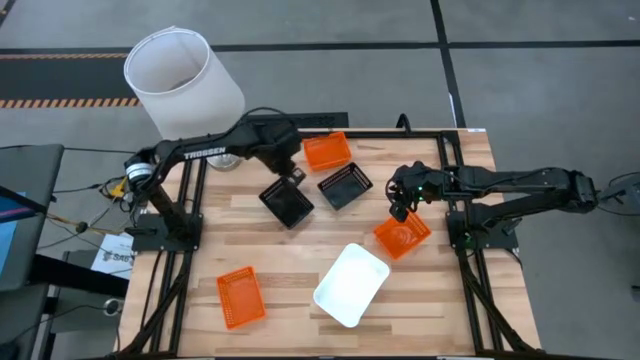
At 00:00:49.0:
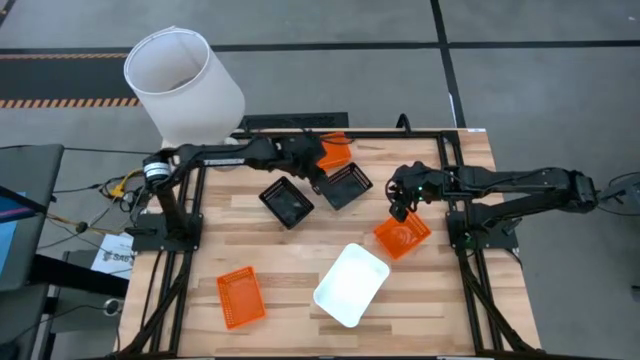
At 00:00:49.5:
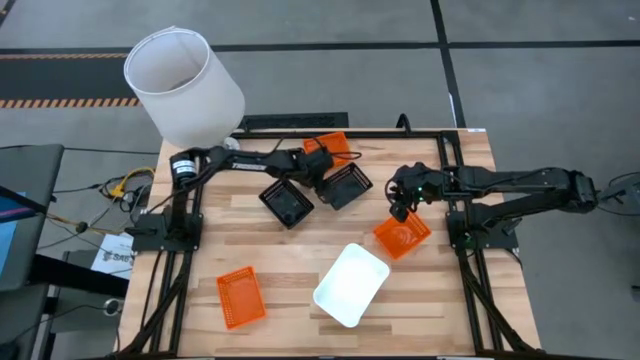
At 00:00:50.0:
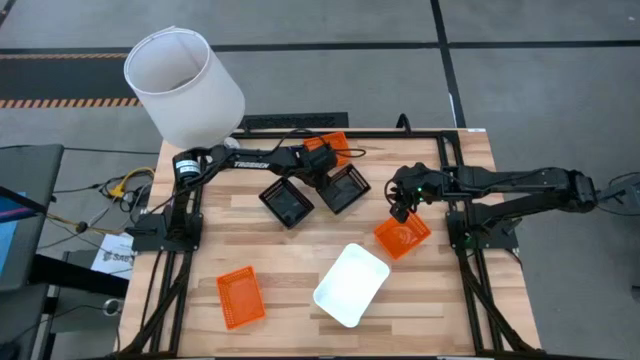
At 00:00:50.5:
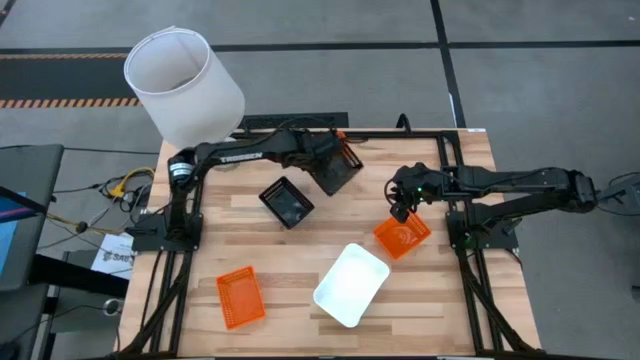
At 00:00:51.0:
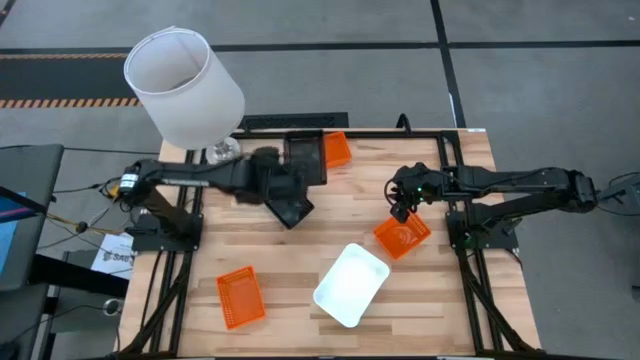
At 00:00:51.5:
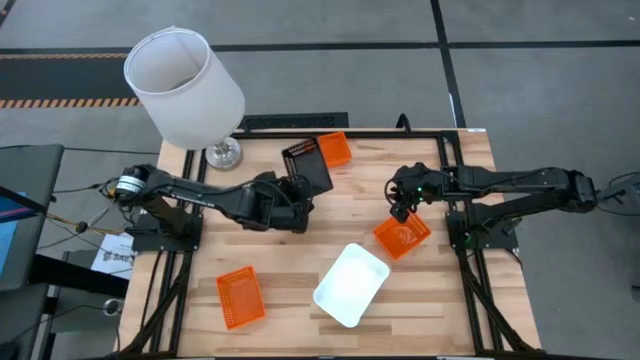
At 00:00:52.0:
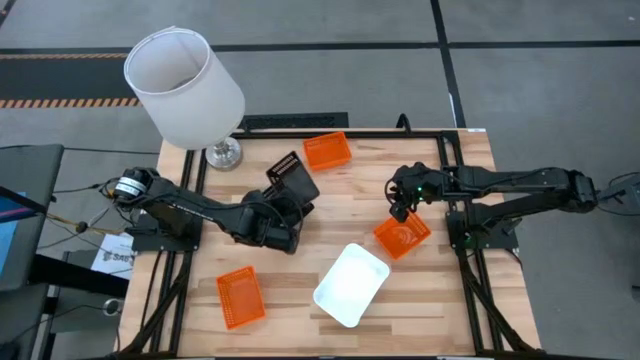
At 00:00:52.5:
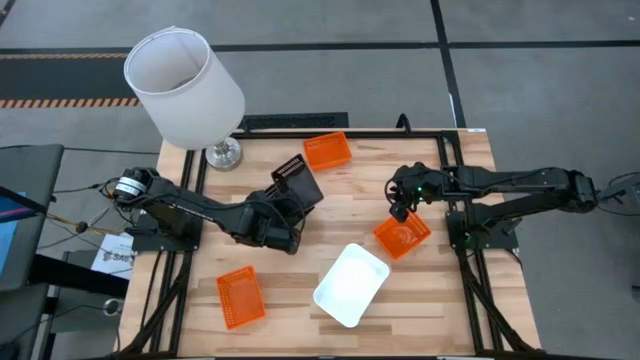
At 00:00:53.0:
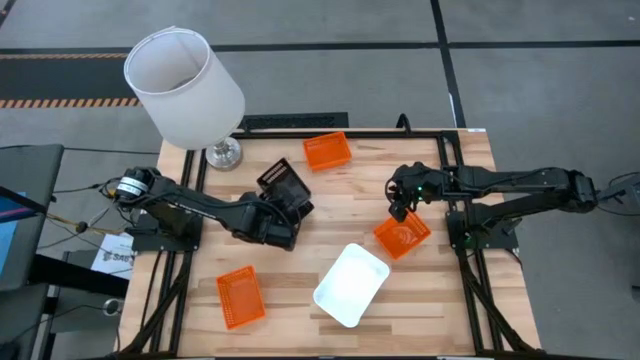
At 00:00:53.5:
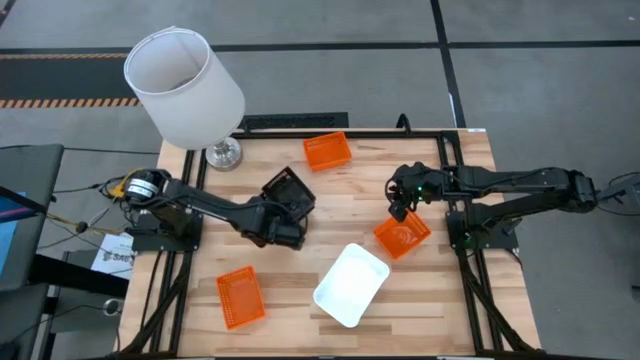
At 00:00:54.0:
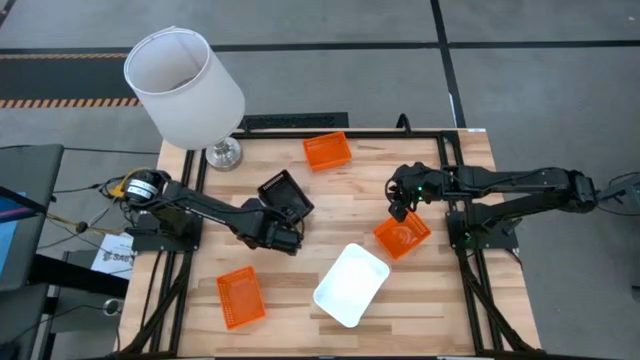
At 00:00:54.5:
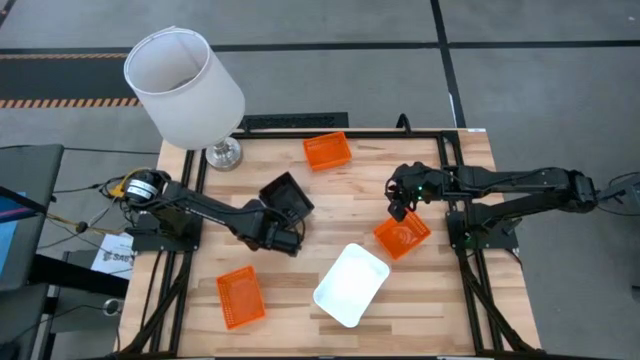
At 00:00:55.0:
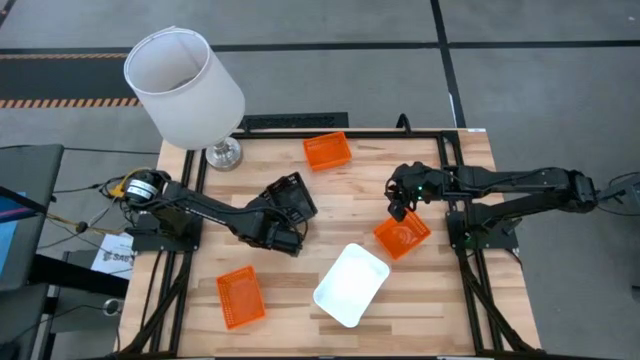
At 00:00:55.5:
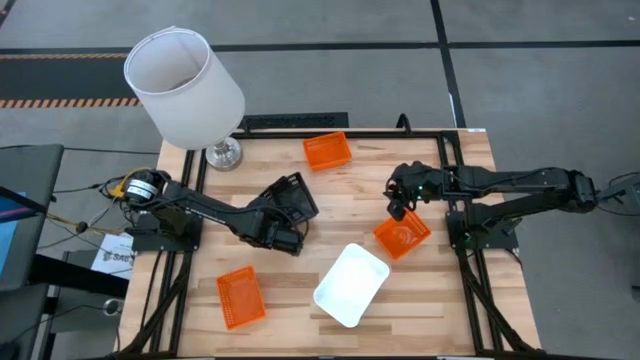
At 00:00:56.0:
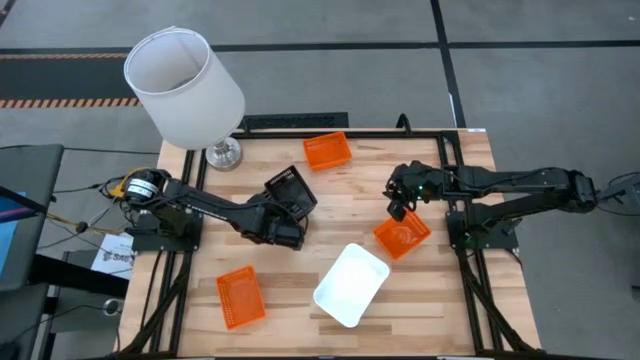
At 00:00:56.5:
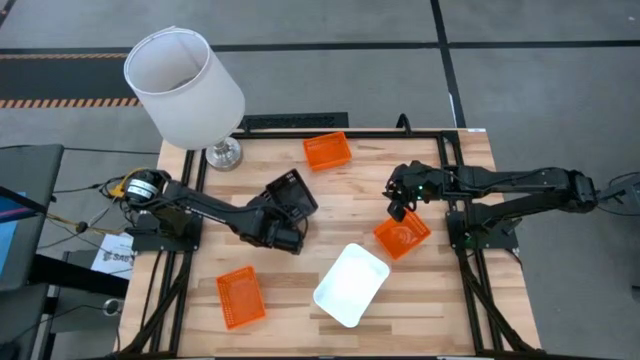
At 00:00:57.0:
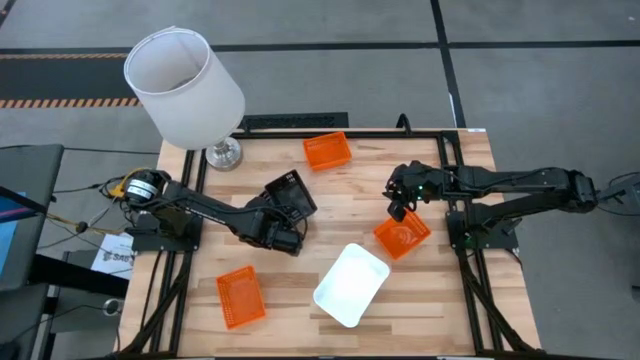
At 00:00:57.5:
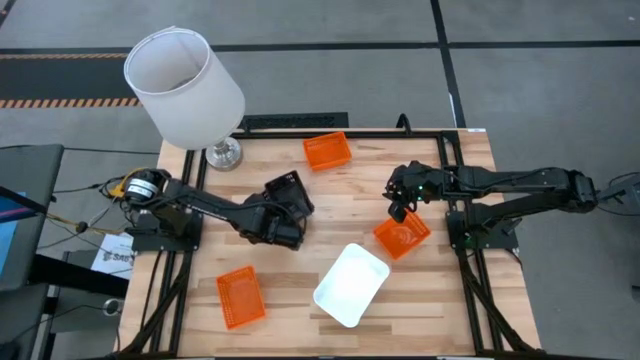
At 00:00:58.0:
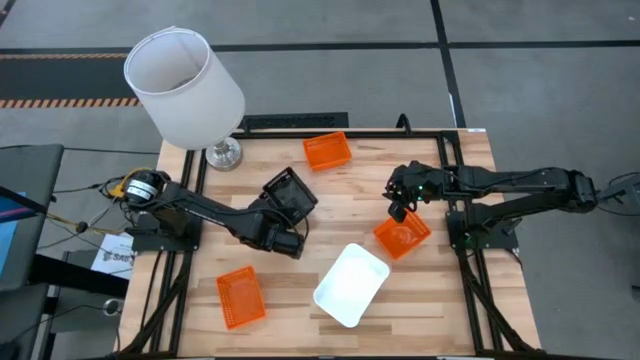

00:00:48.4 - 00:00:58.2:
Stack the right black bin on the black bins

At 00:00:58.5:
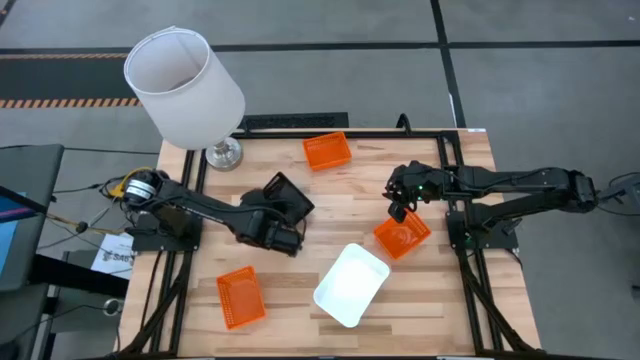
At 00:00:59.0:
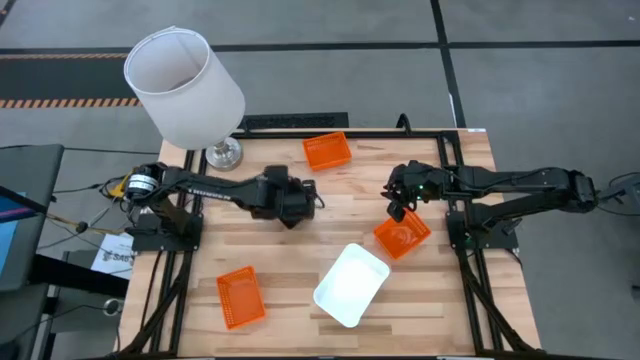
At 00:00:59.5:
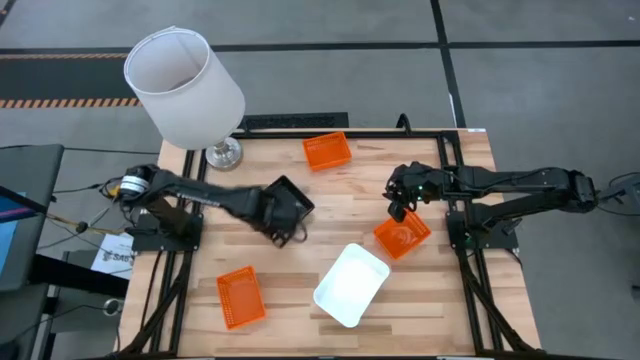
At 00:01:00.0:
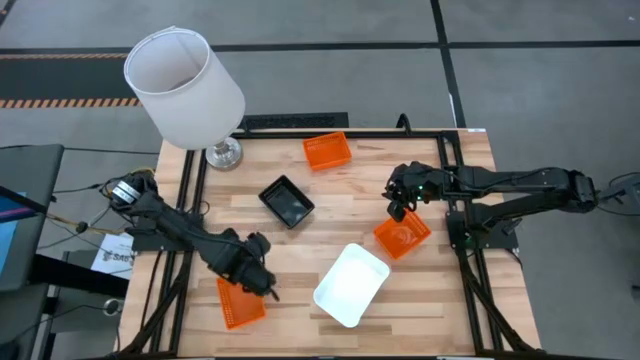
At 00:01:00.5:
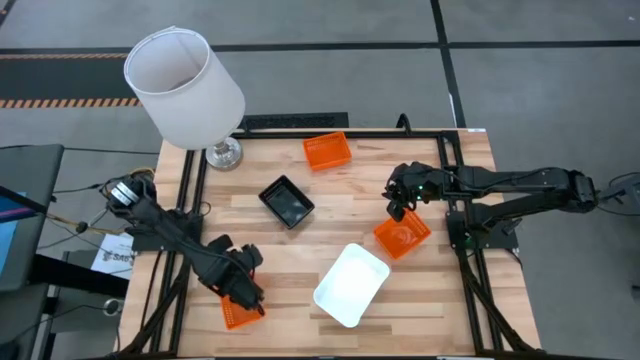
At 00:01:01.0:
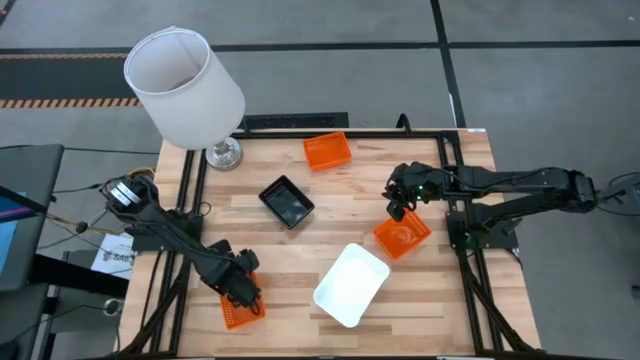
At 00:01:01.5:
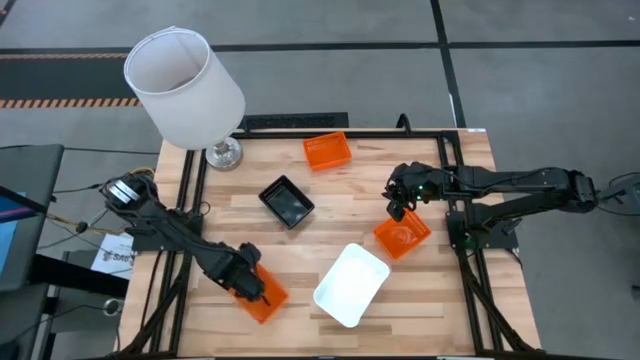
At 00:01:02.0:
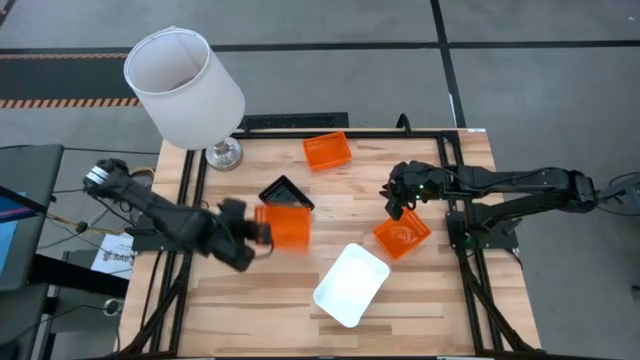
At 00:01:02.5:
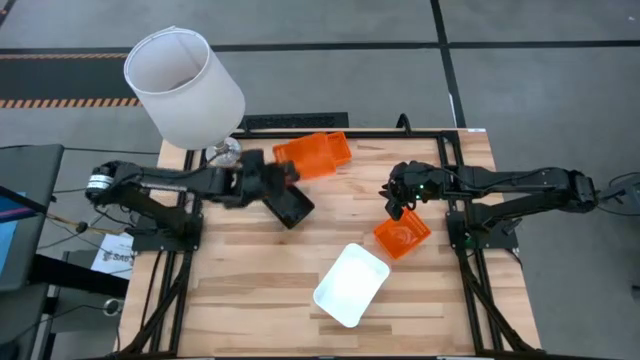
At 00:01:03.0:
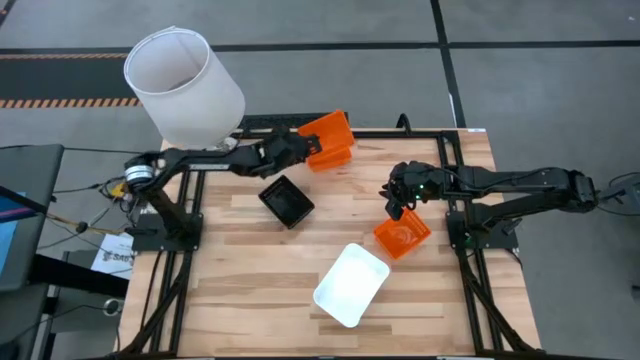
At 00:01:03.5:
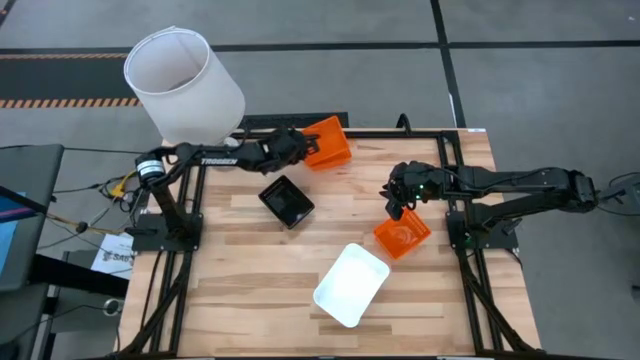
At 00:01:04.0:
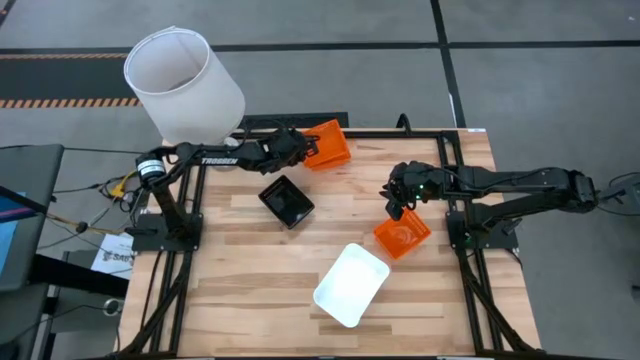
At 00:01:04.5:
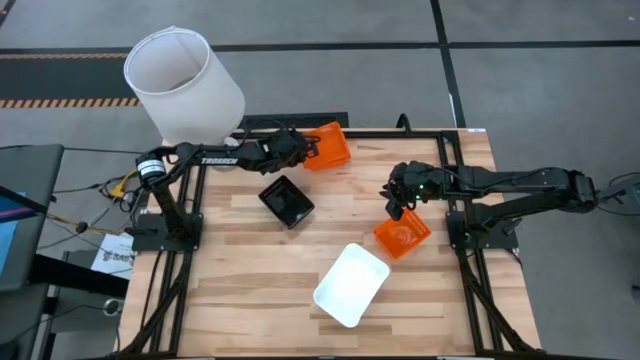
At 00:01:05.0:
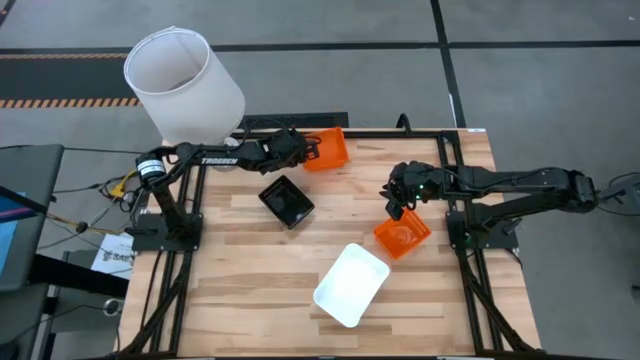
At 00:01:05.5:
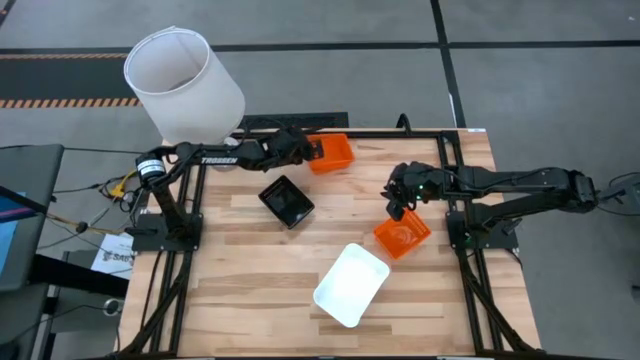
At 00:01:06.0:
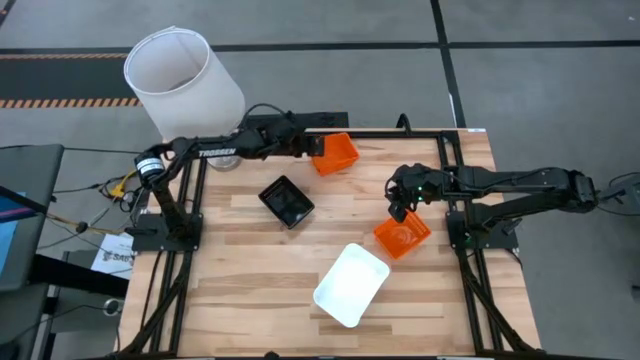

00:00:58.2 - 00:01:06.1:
Stack the bottom orange bin on the top orange bin
